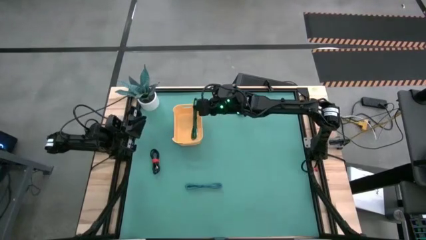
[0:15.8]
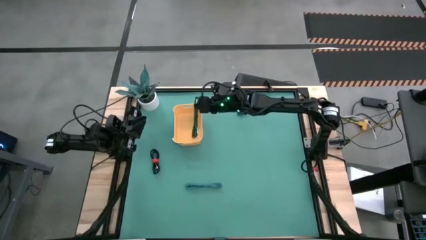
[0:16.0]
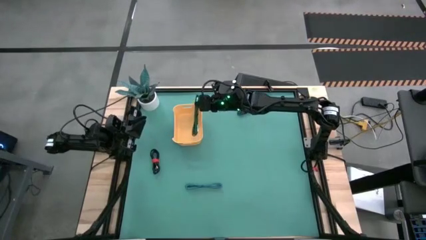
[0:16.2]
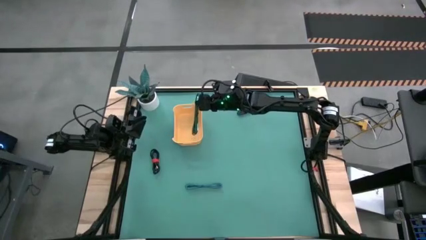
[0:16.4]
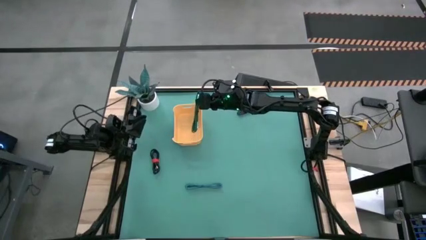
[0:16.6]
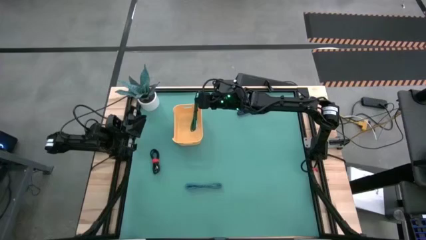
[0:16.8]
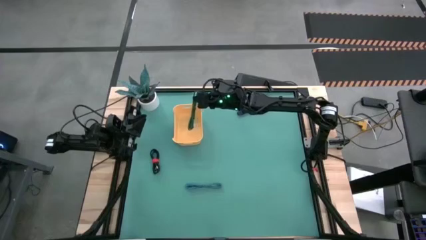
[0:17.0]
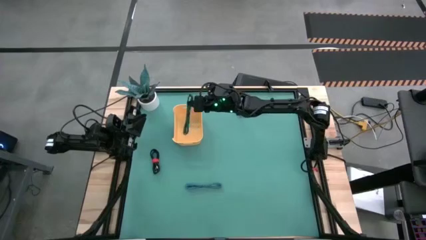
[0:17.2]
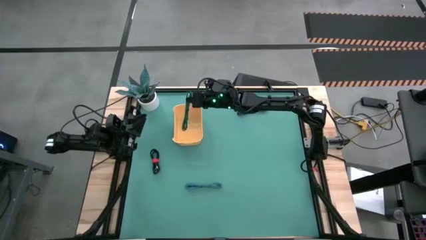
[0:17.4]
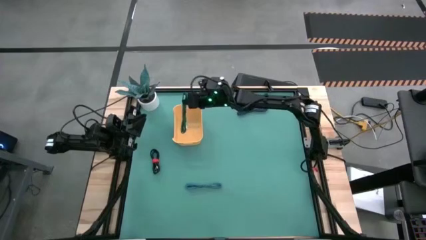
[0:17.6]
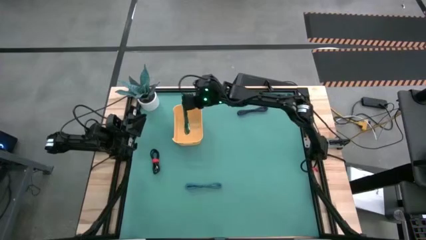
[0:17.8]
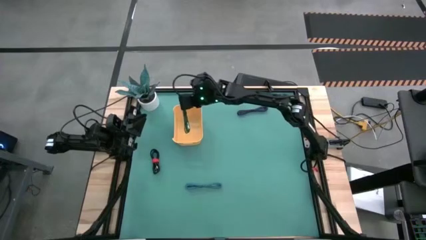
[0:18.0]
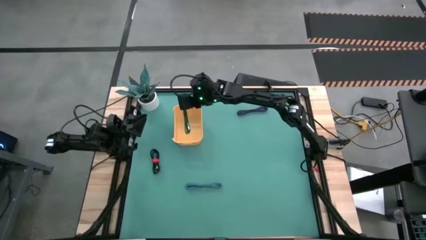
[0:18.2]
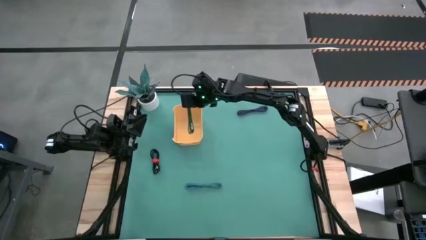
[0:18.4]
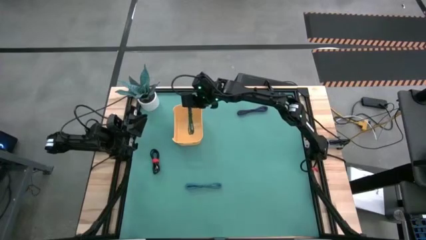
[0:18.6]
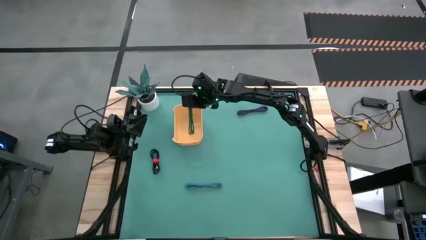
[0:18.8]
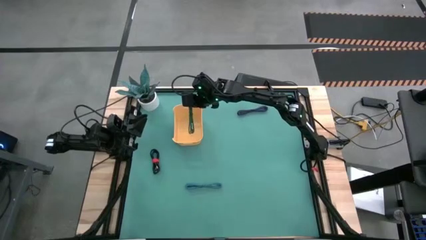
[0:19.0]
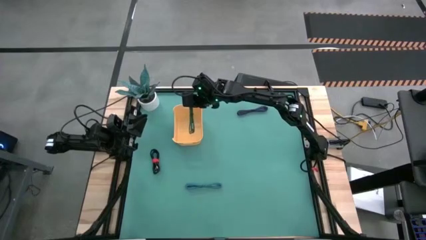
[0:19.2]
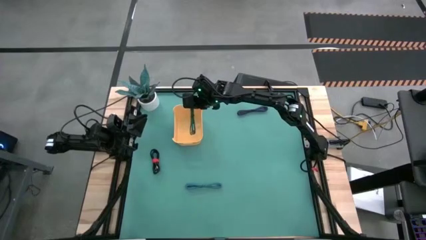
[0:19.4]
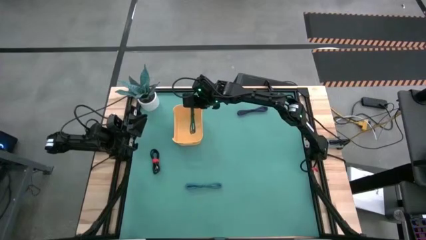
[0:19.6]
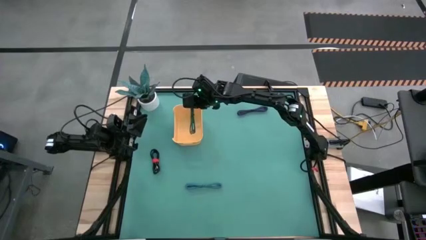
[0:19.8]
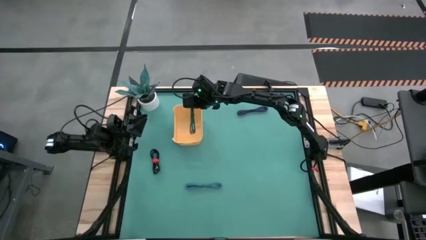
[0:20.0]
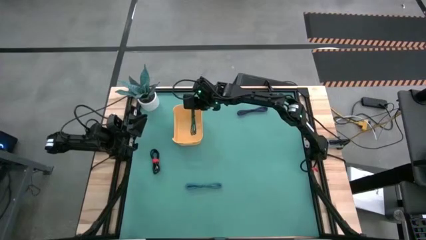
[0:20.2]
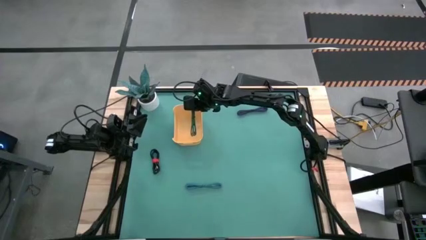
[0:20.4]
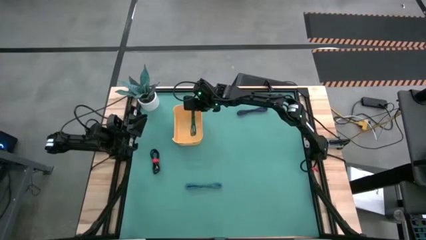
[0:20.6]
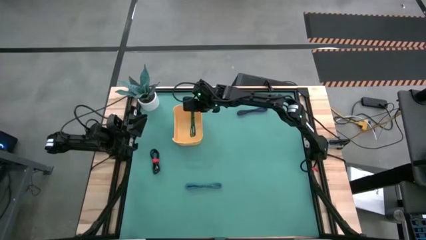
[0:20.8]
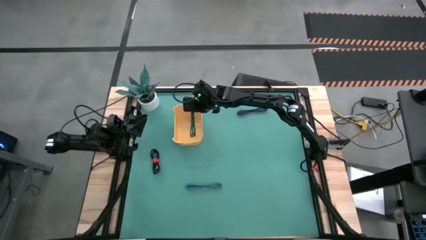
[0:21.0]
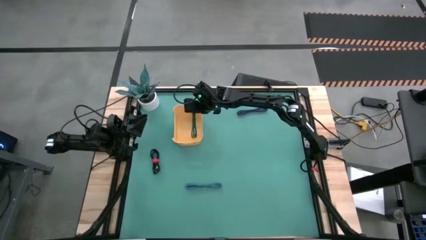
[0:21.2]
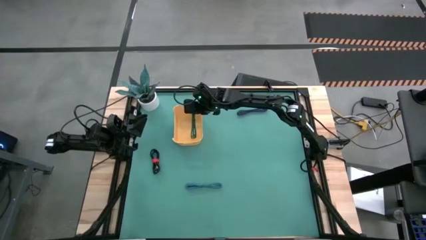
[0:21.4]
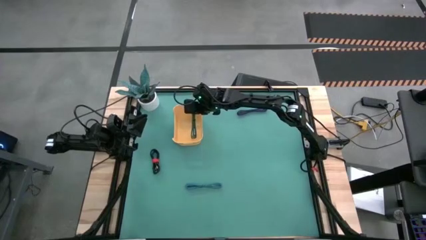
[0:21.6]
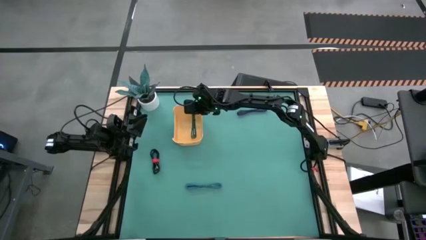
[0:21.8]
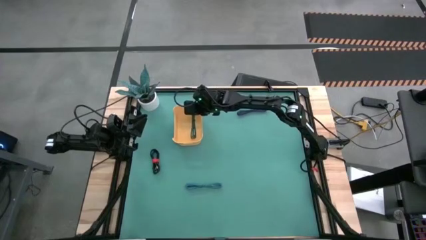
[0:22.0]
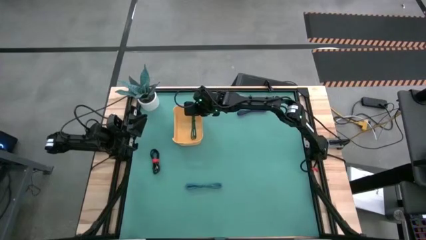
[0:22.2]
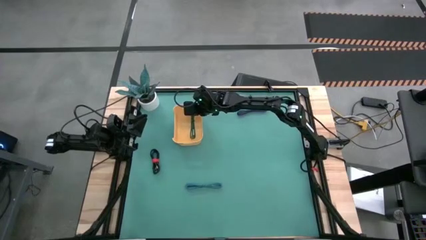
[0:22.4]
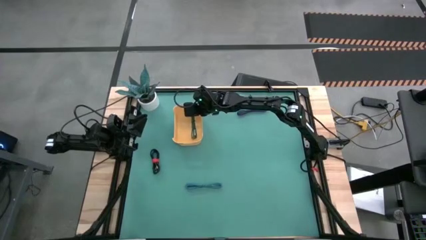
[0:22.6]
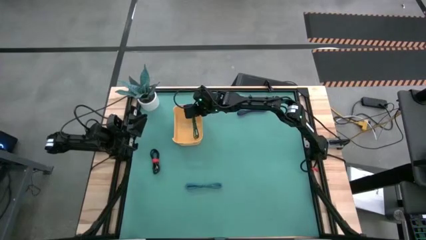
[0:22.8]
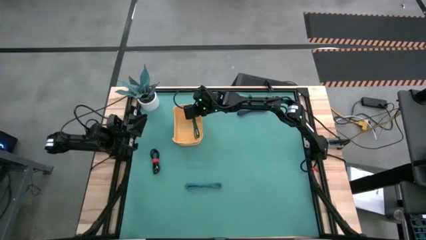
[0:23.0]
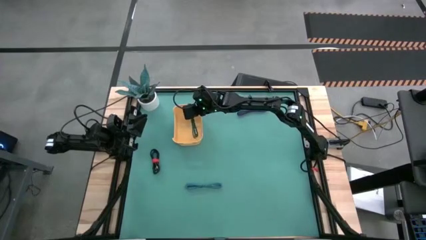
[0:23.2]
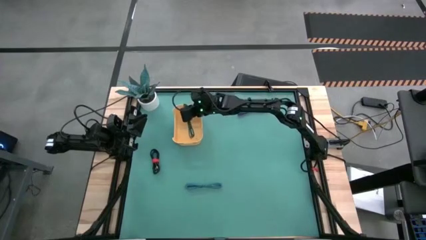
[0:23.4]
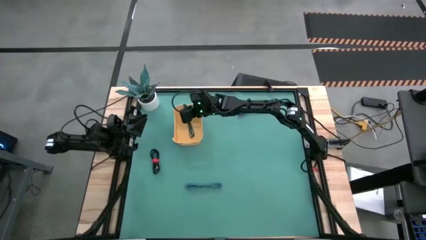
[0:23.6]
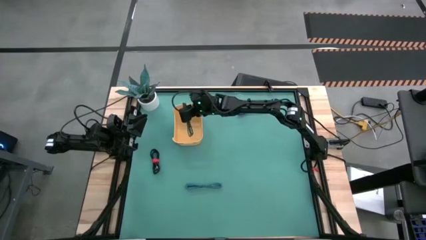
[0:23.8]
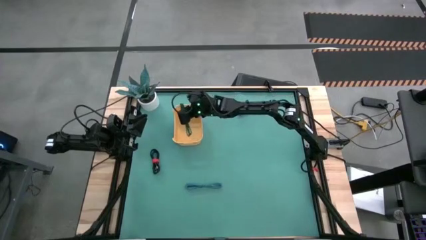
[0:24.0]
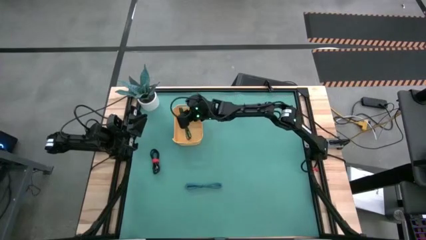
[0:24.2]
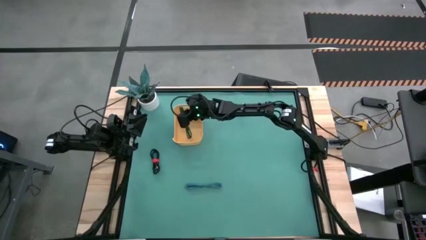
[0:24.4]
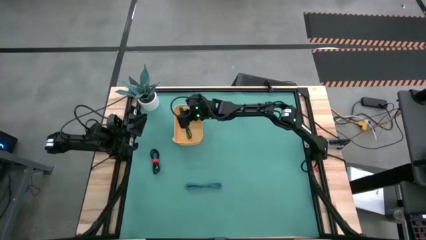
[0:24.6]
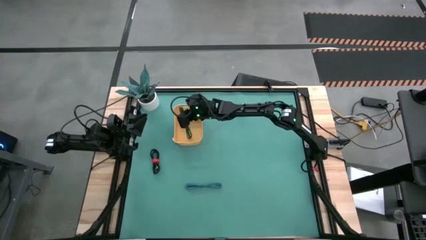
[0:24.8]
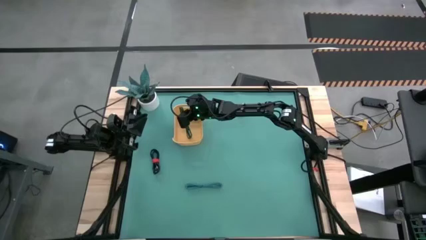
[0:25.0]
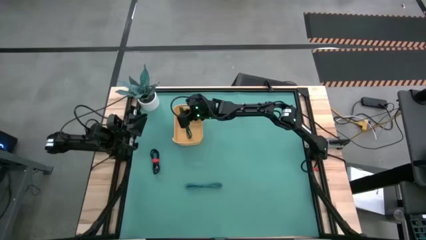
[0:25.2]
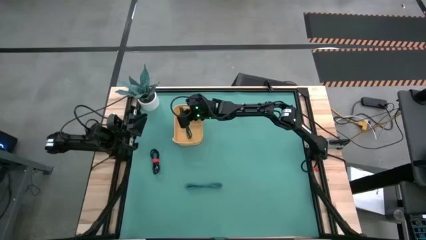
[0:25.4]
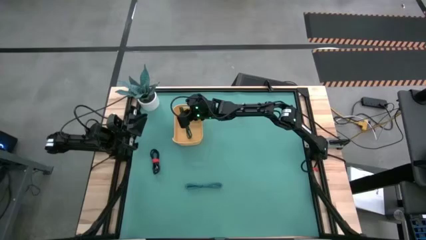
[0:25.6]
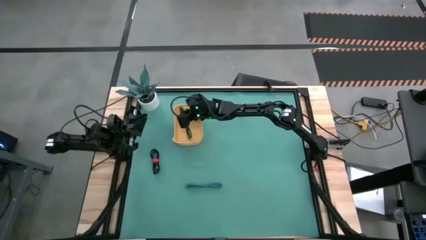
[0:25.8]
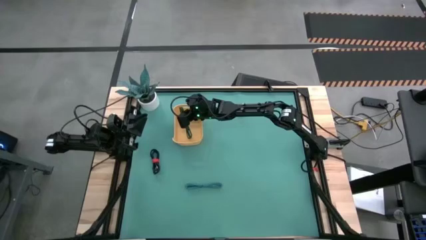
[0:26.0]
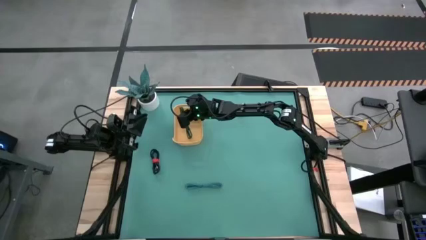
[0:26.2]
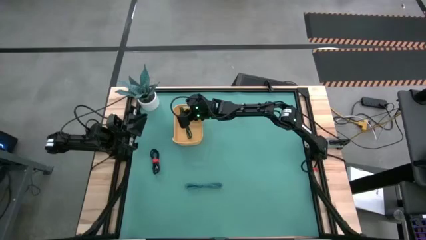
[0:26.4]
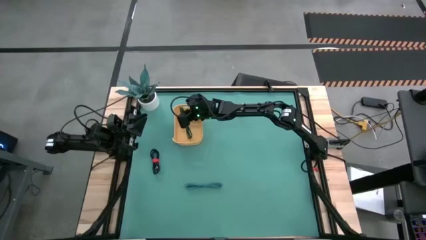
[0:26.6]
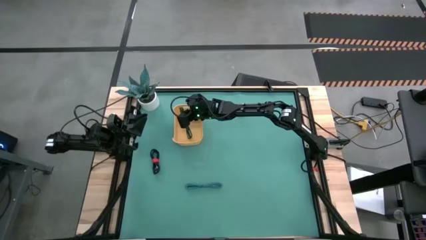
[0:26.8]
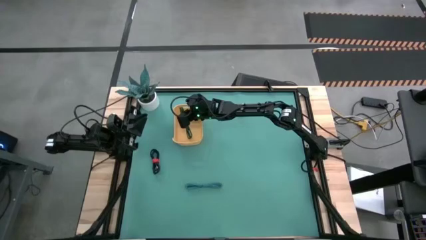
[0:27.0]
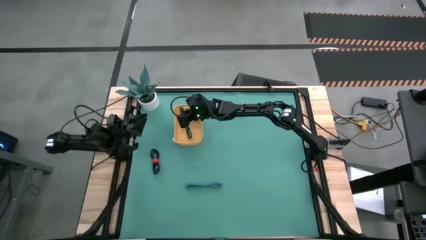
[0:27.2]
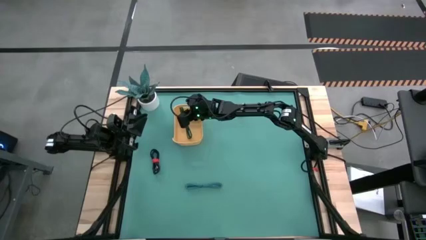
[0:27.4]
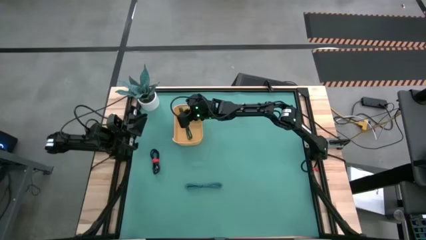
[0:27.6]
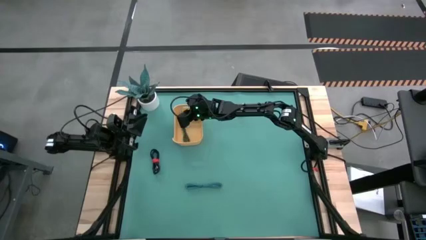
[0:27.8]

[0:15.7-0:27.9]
Task: Pick and place USB-C Cables
Put the green USB cable into the yellow bin
